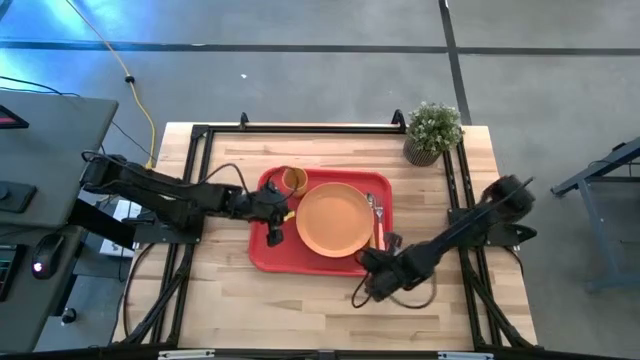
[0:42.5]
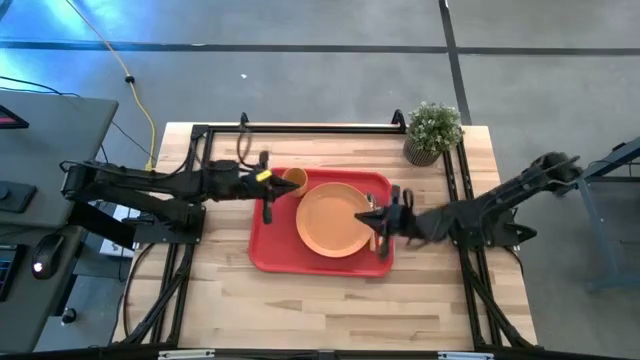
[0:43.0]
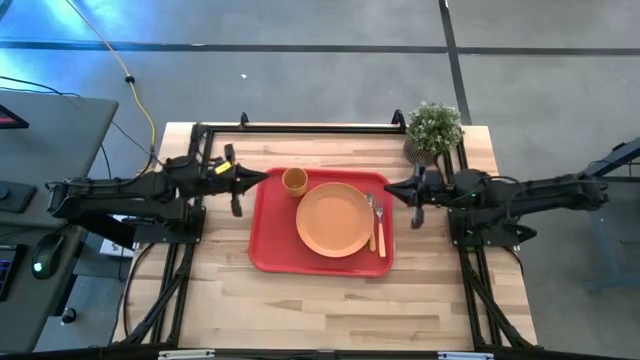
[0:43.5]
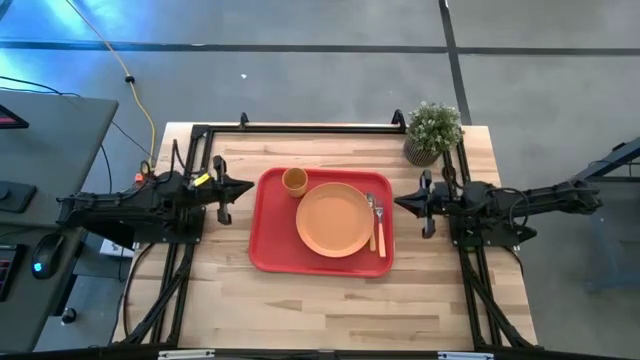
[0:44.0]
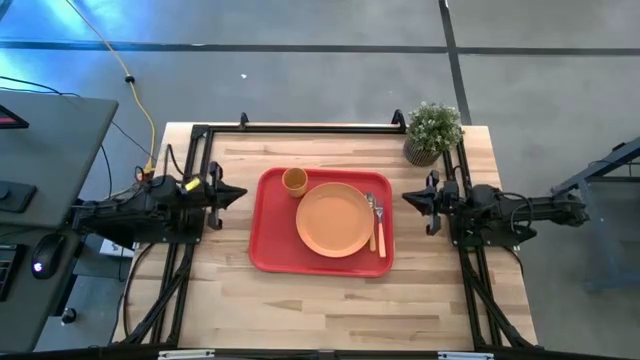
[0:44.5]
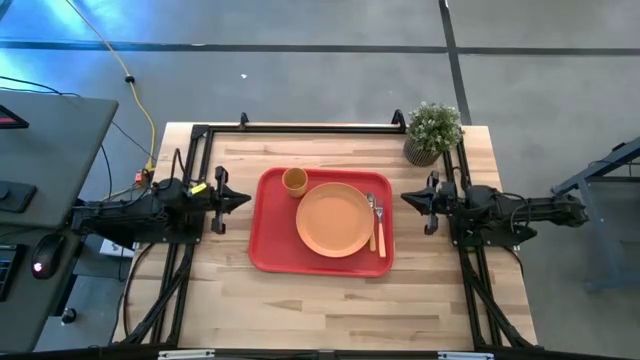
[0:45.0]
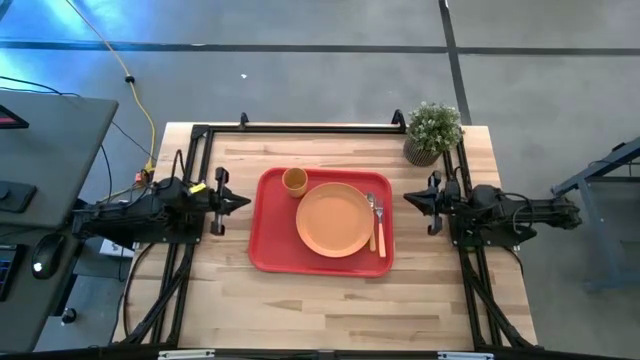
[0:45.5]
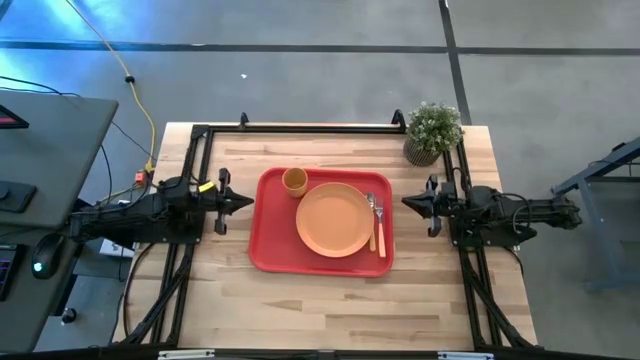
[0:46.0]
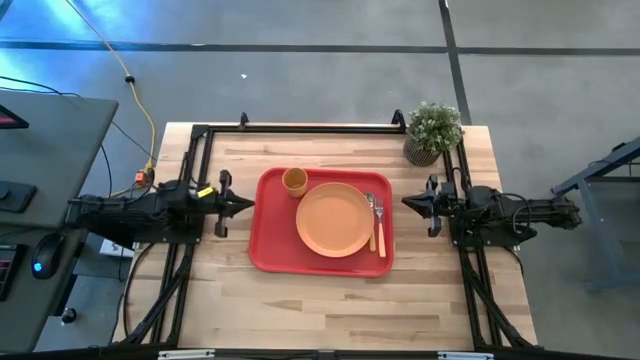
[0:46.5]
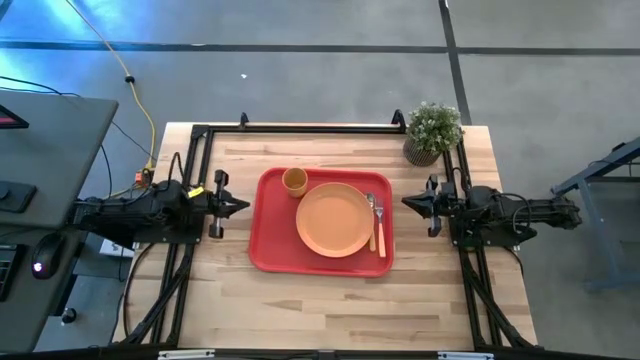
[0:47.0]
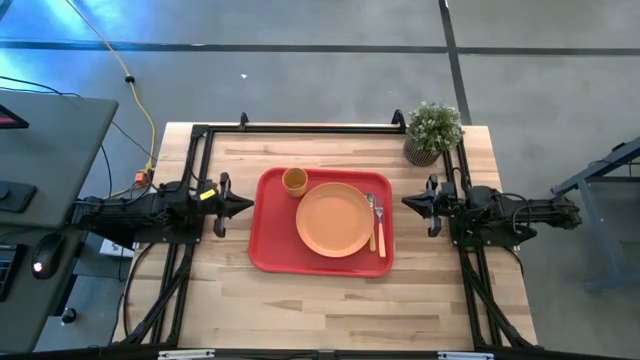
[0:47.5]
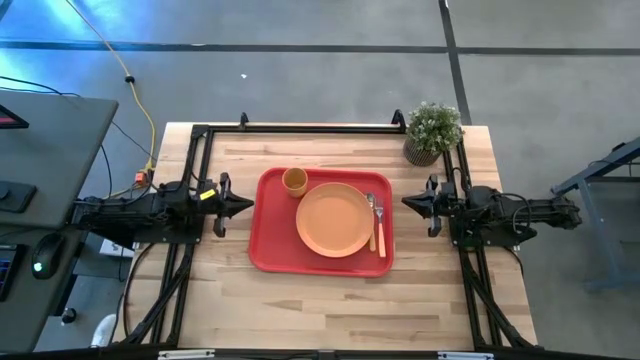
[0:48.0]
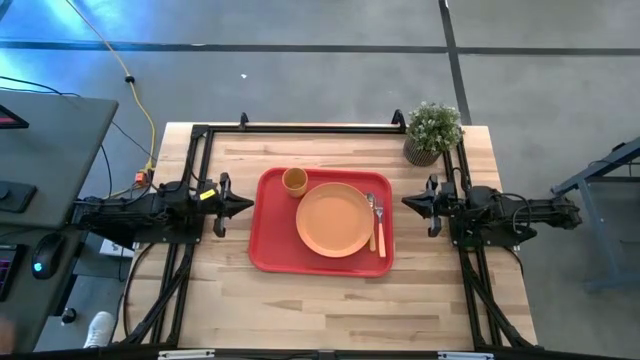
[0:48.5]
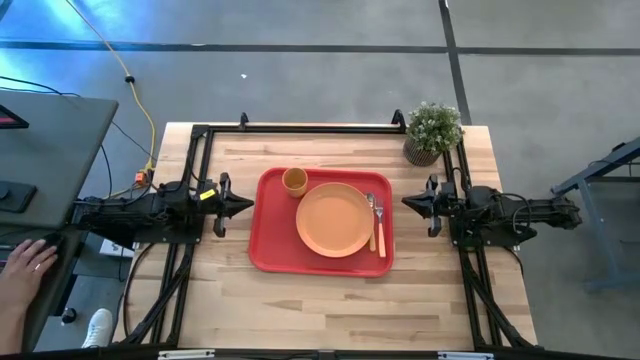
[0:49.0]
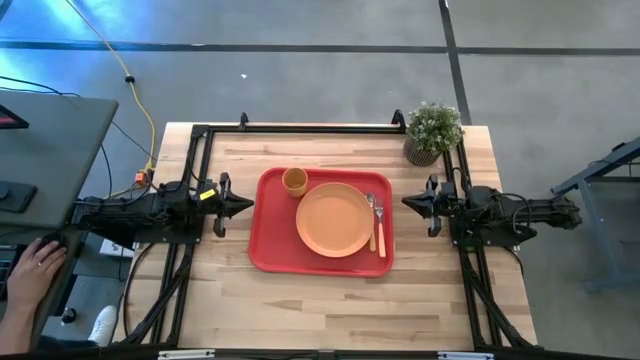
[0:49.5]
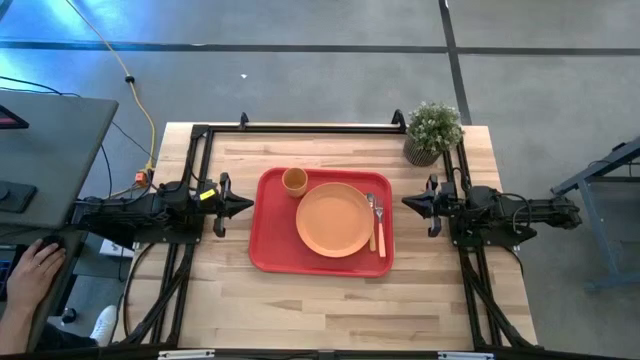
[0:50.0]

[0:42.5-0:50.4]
Task: Pick and place plate/cup/fork/spoon on tray
Return to Home Position

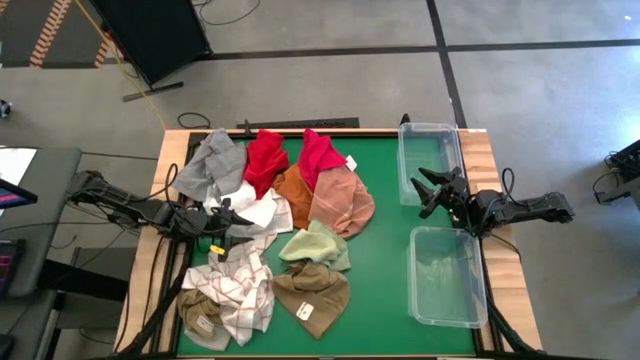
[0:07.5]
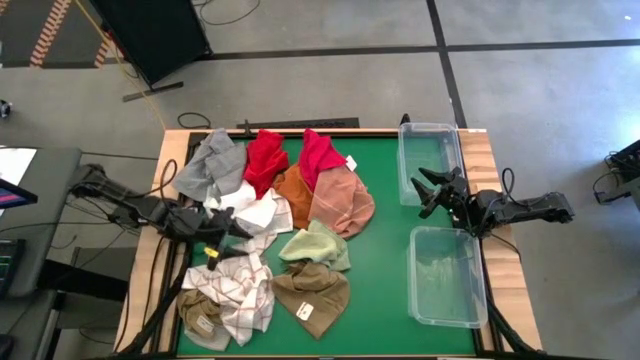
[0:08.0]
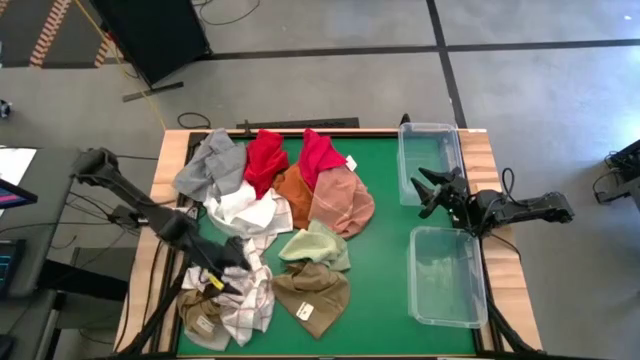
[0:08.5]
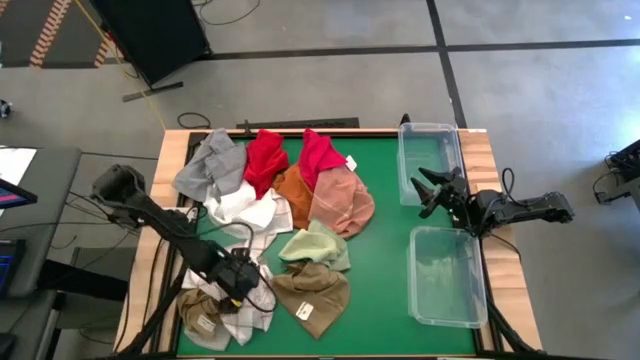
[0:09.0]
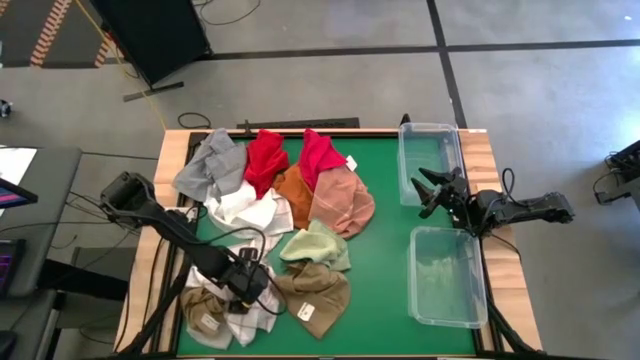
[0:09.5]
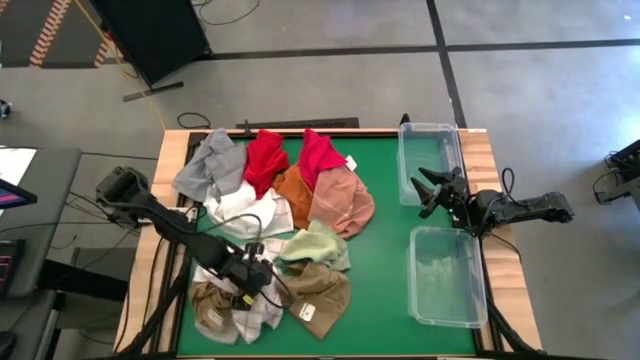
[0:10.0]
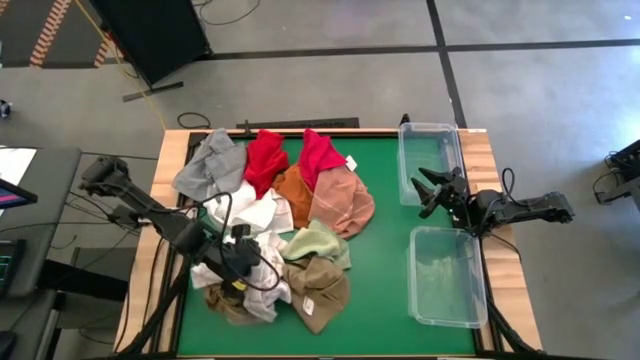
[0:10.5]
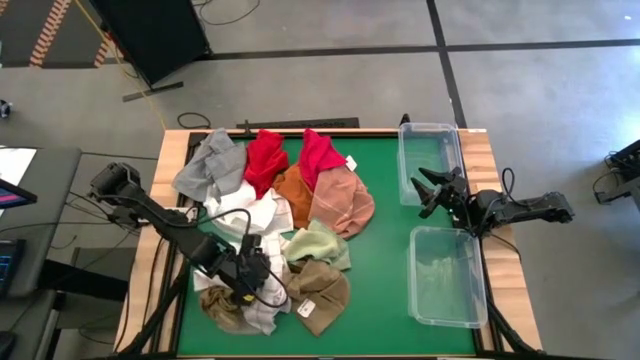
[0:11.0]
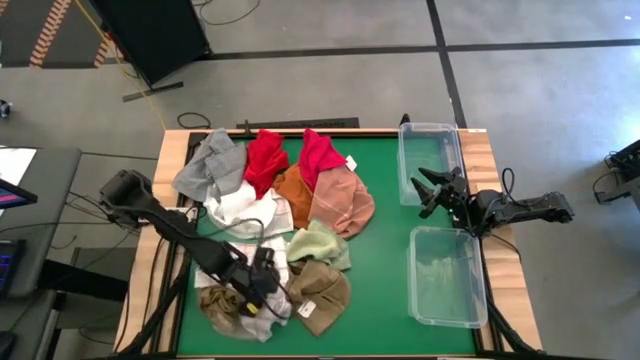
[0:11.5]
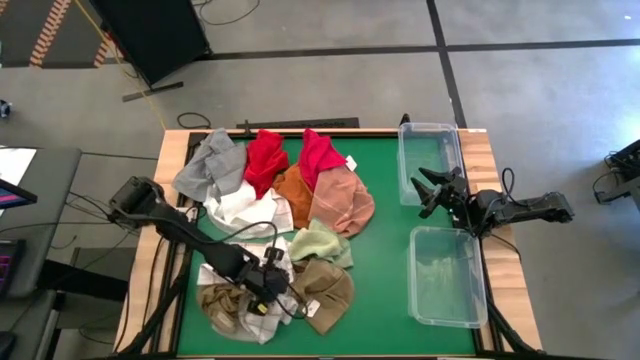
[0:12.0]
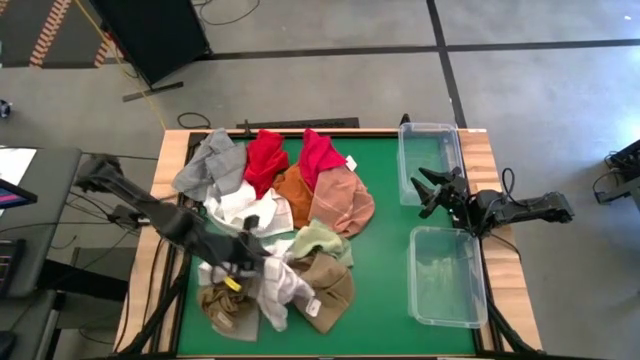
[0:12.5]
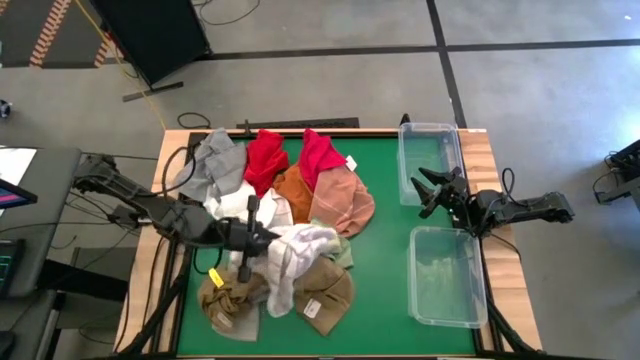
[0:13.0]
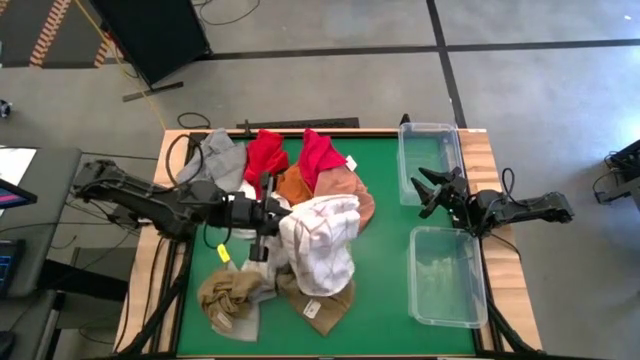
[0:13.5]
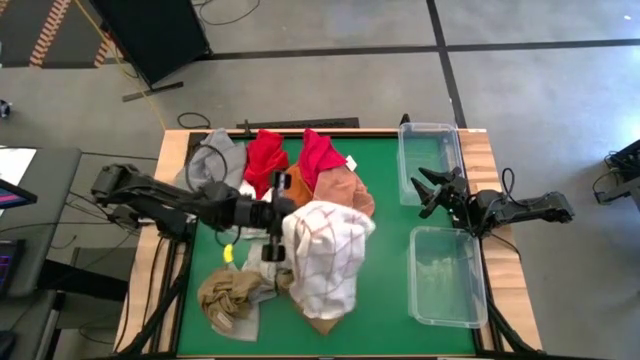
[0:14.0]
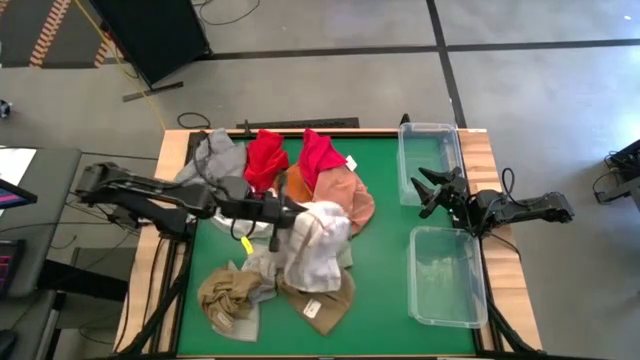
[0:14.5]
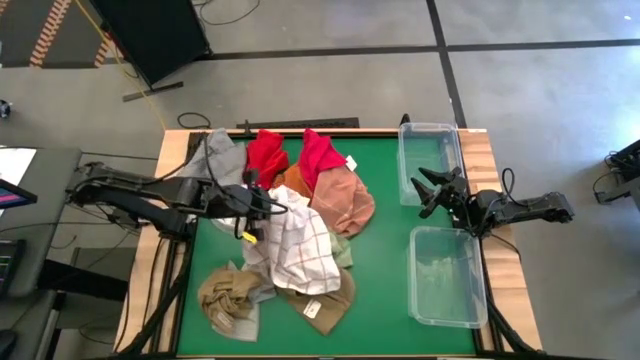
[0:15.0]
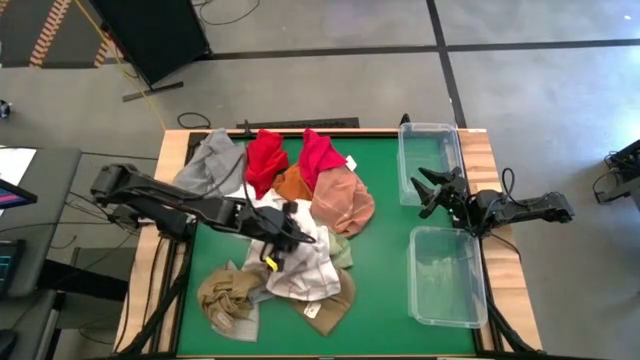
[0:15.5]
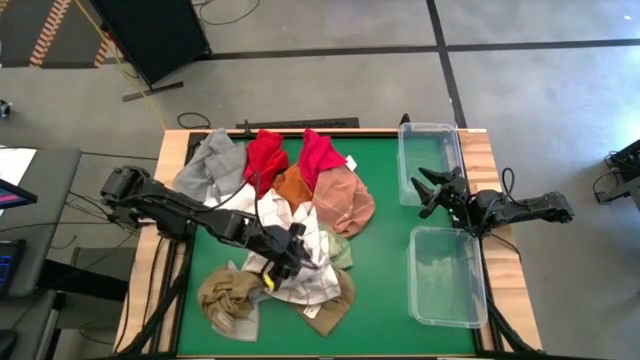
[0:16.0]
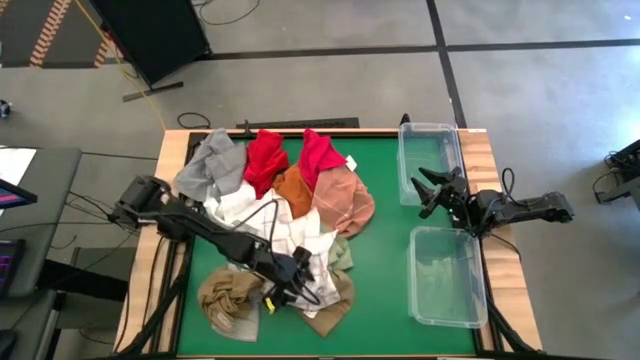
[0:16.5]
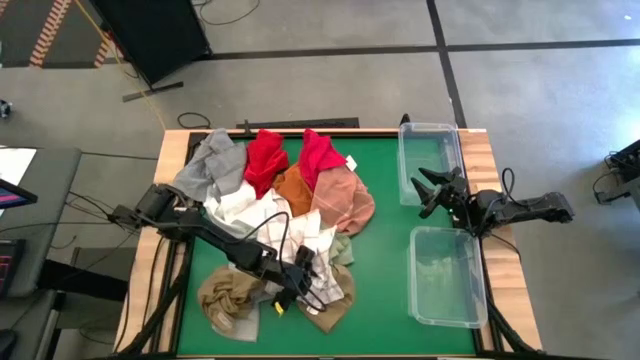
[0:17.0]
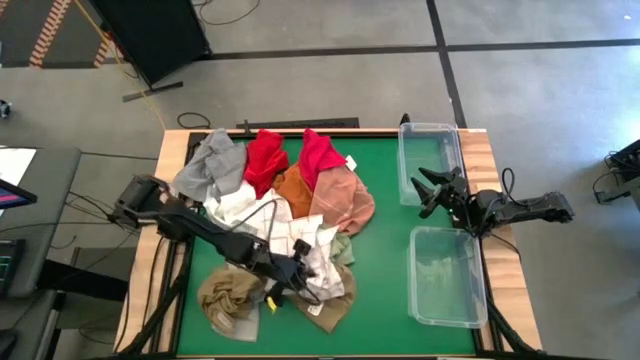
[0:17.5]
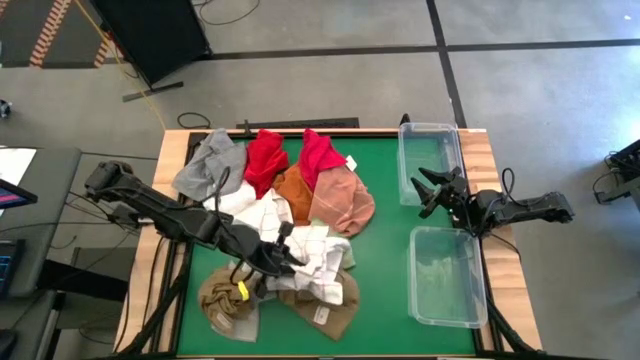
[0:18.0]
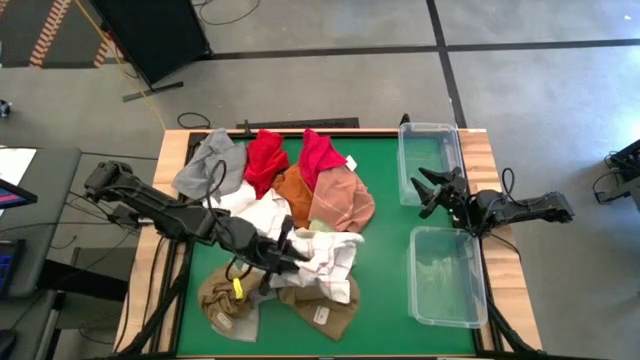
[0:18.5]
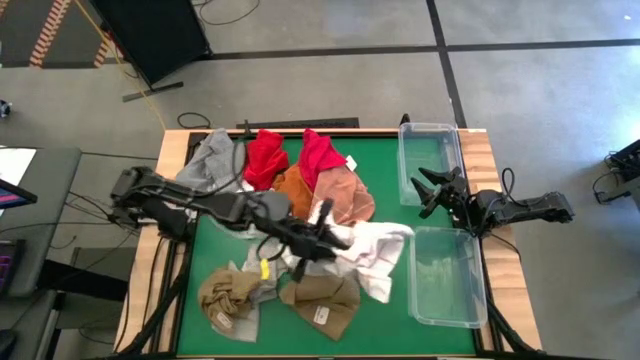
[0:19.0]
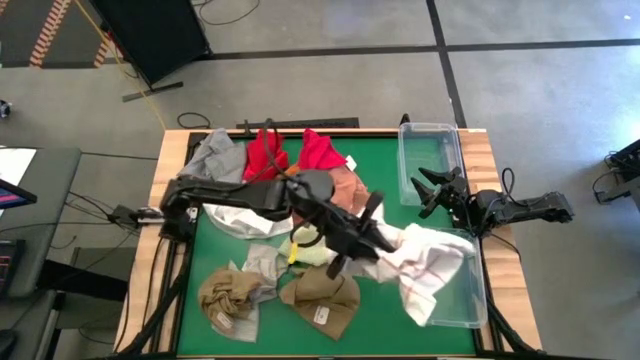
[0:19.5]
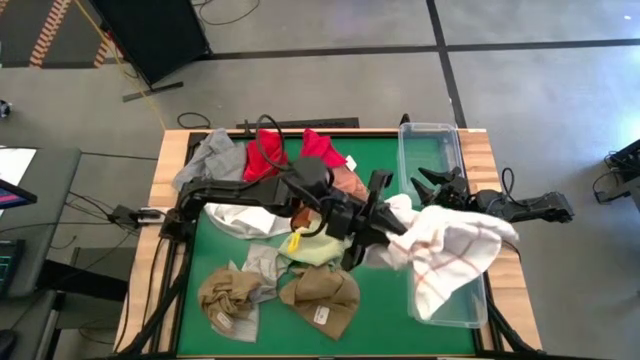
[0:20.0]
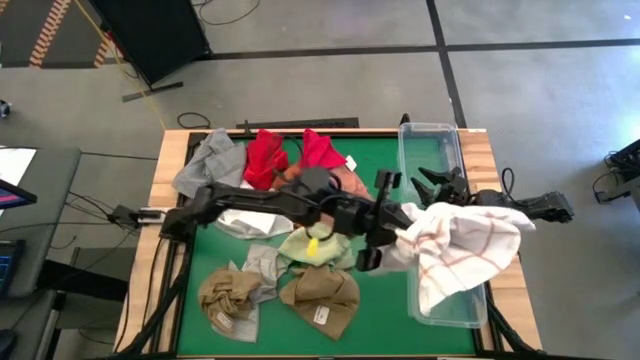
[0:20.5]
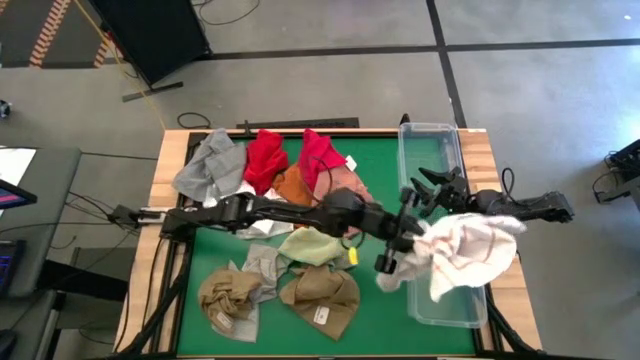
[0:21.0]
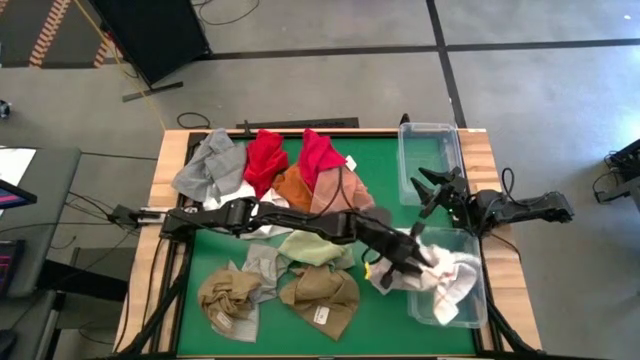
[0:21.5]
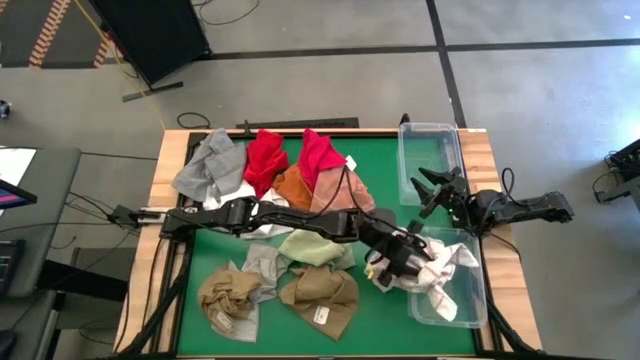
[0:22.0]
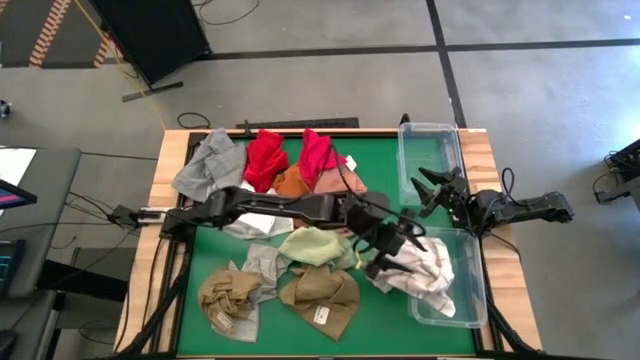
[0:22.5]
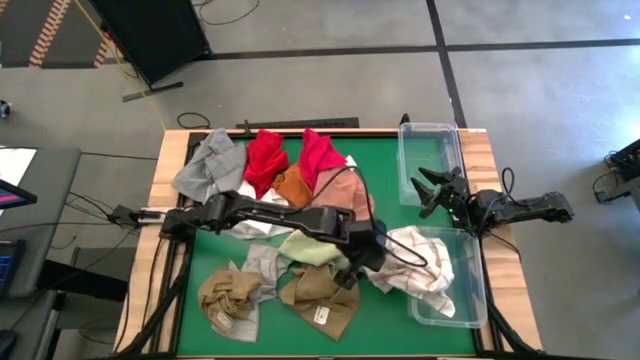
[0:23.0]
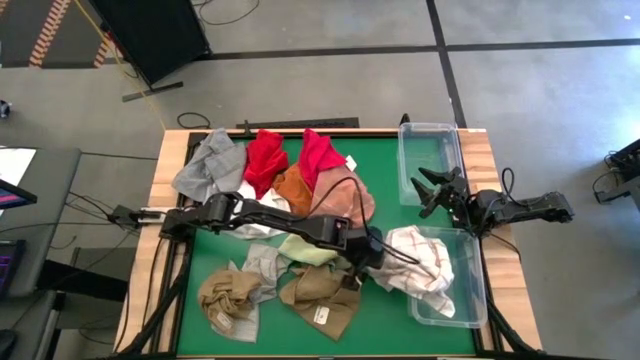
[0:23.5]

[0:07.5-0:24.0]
Task: Sort towels by color in basket
Put the white patterned towel into the bottom transparent bin
